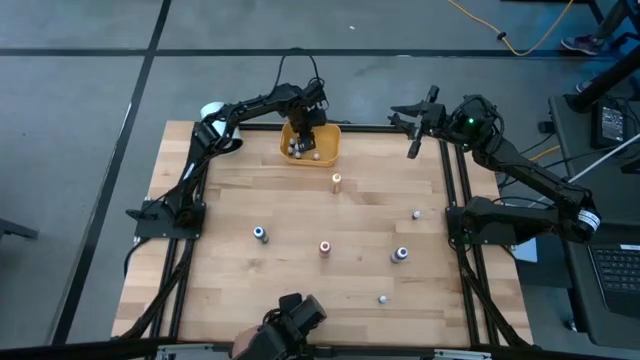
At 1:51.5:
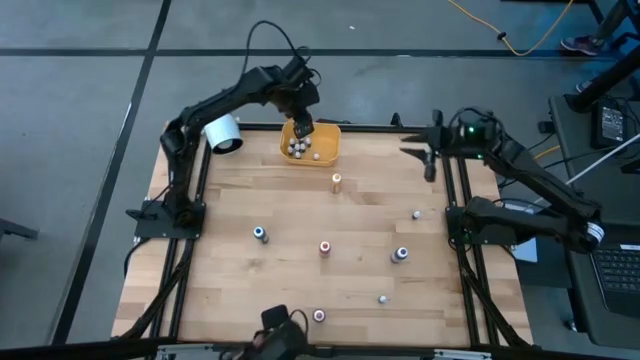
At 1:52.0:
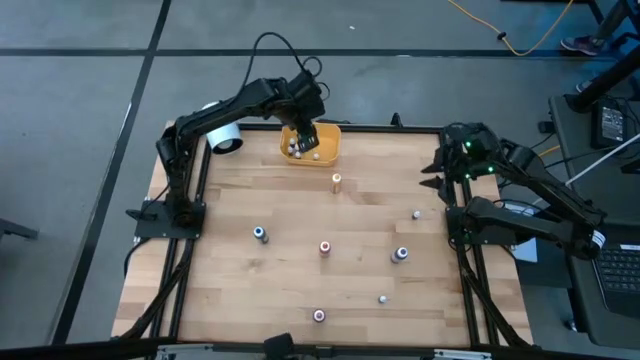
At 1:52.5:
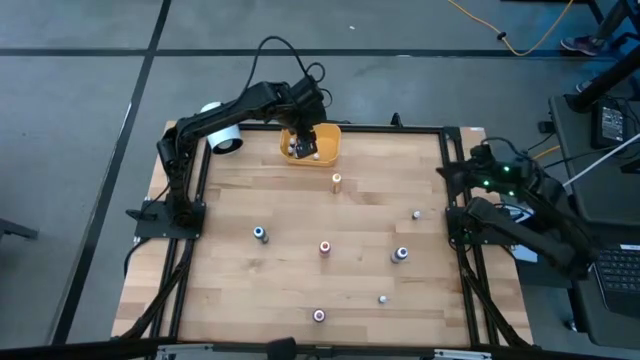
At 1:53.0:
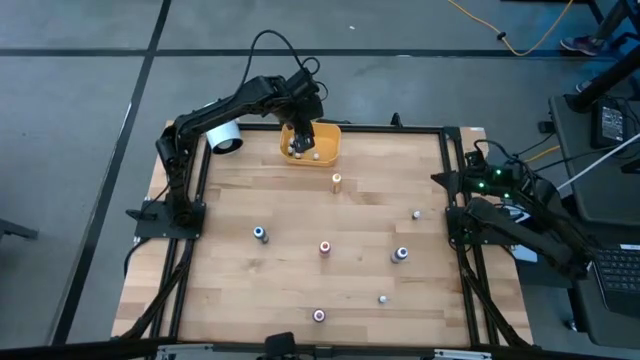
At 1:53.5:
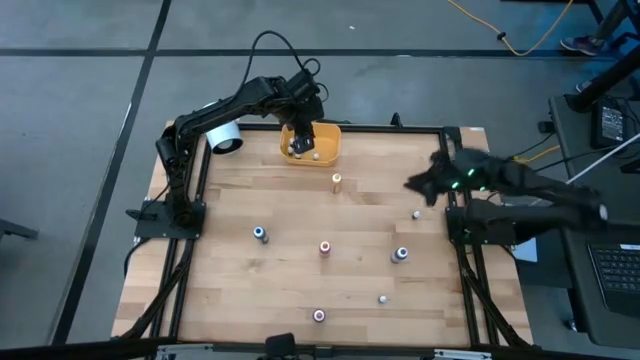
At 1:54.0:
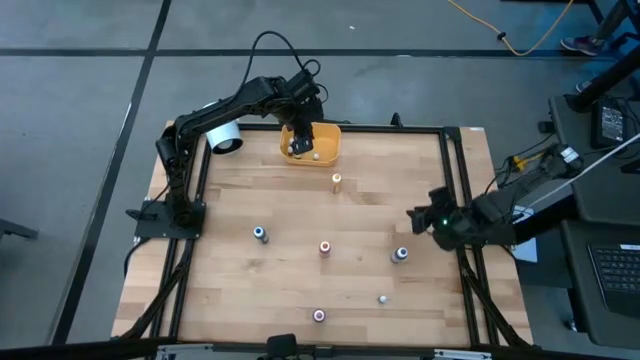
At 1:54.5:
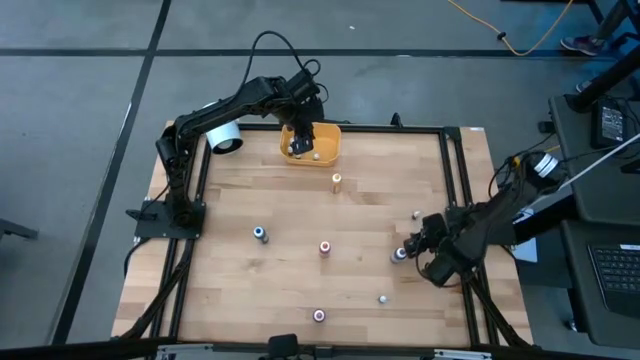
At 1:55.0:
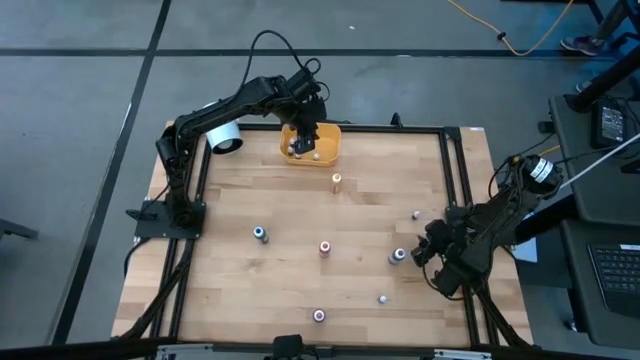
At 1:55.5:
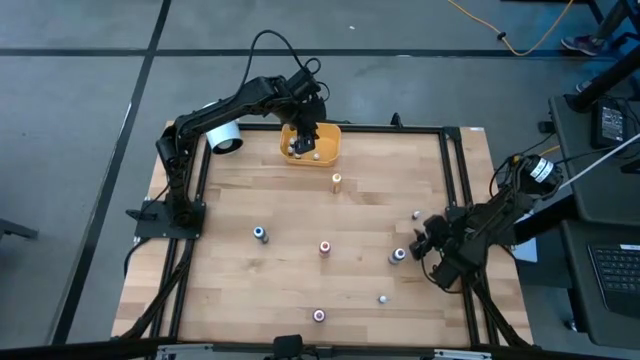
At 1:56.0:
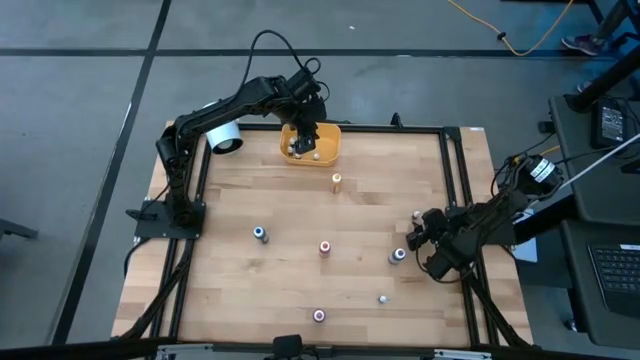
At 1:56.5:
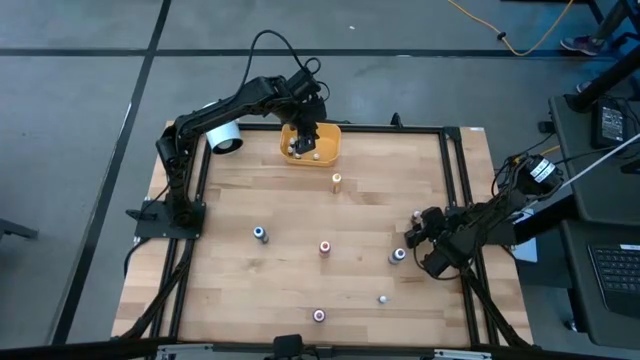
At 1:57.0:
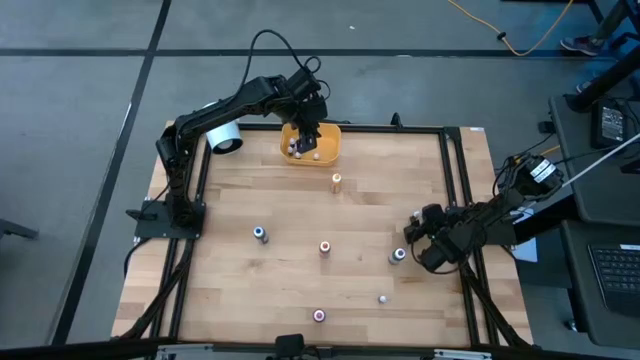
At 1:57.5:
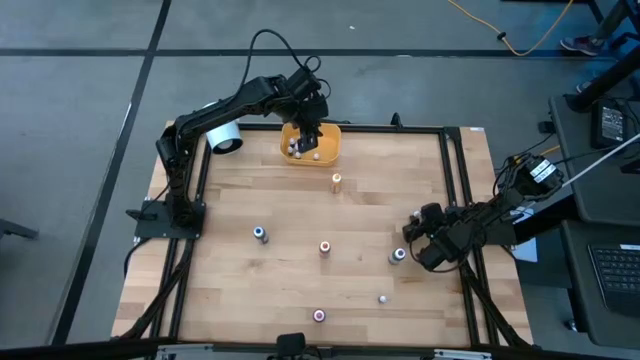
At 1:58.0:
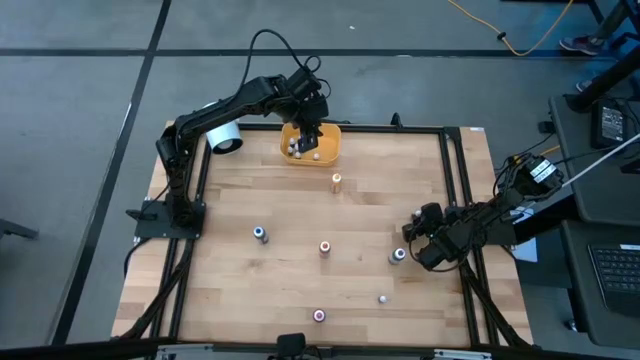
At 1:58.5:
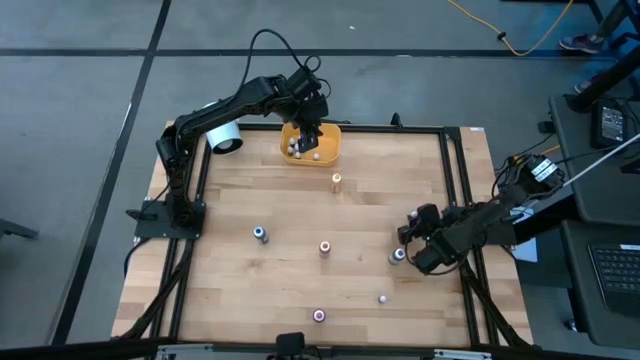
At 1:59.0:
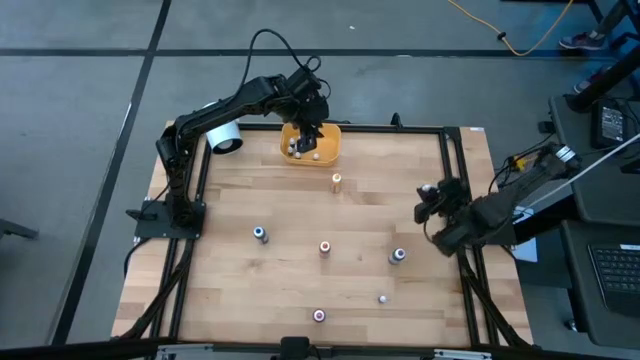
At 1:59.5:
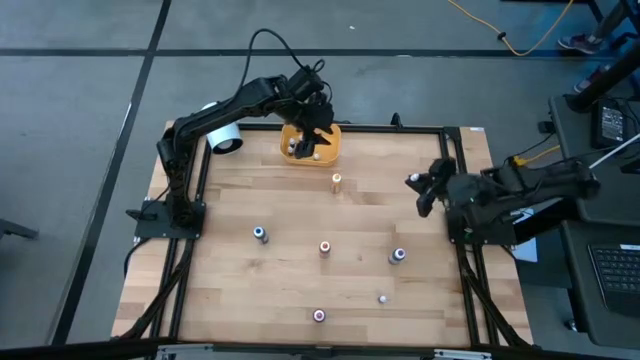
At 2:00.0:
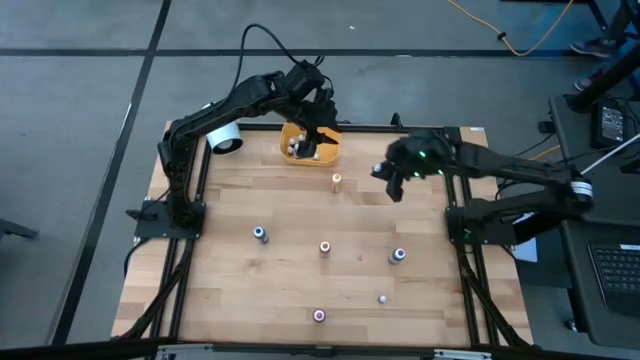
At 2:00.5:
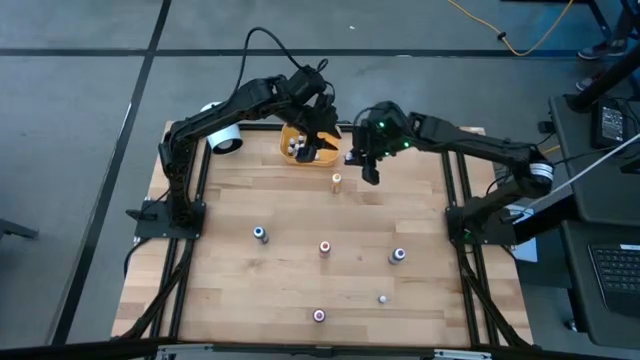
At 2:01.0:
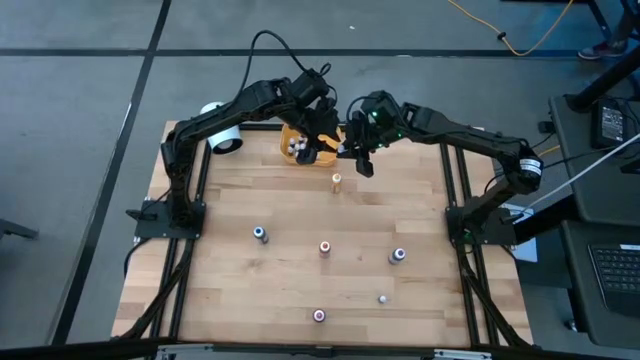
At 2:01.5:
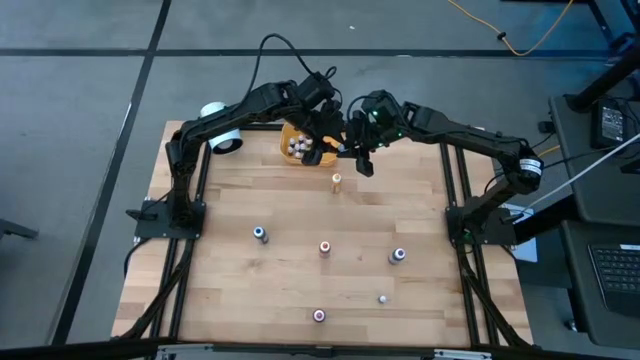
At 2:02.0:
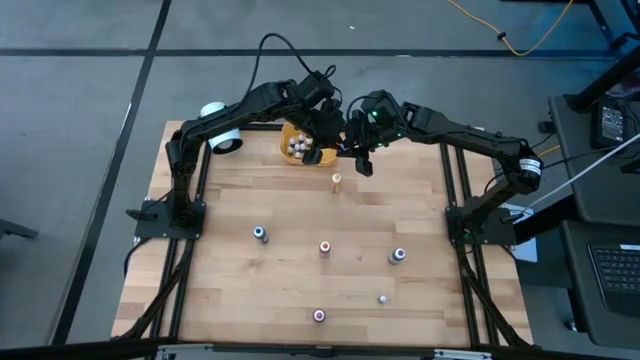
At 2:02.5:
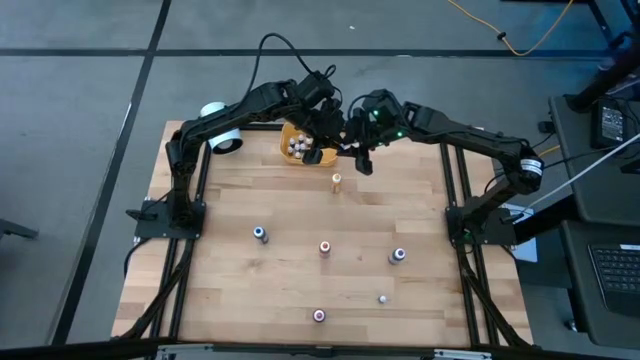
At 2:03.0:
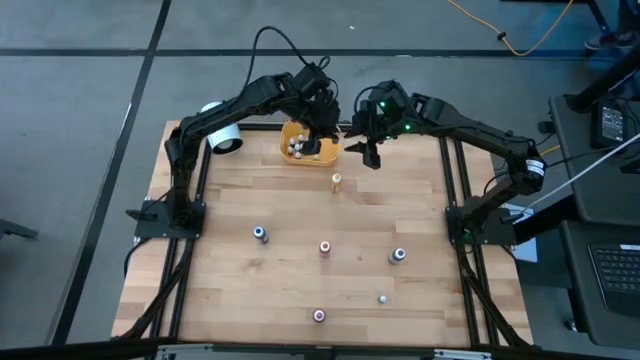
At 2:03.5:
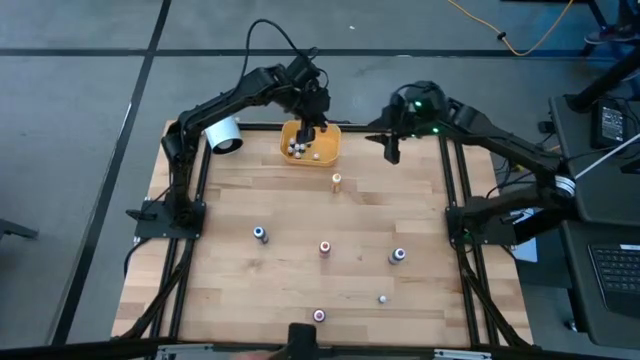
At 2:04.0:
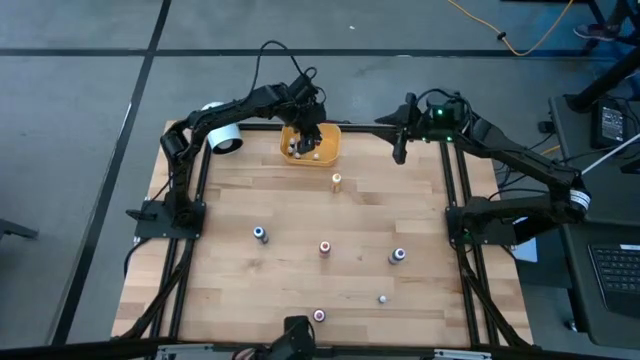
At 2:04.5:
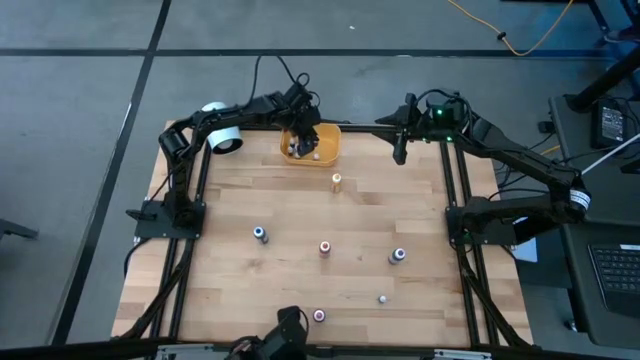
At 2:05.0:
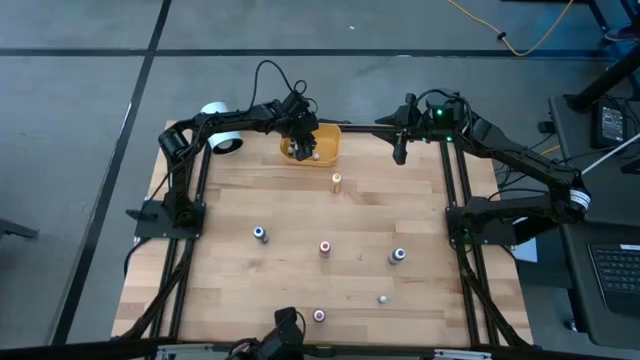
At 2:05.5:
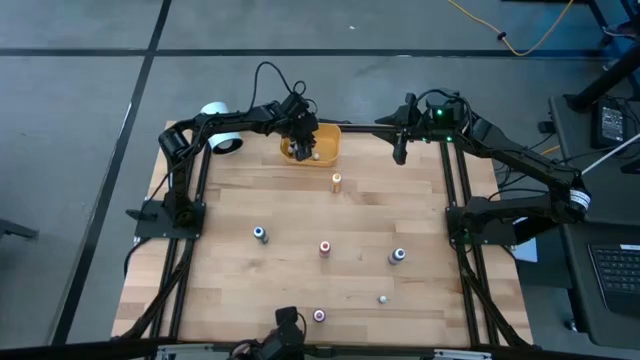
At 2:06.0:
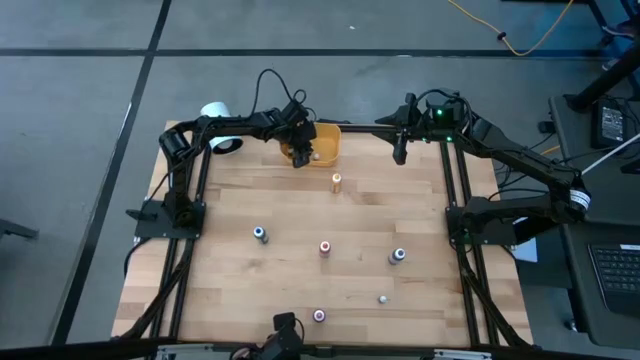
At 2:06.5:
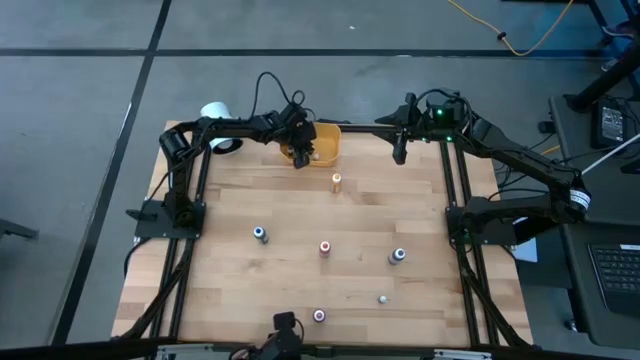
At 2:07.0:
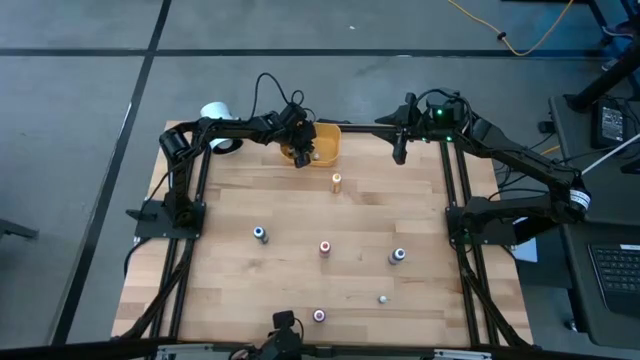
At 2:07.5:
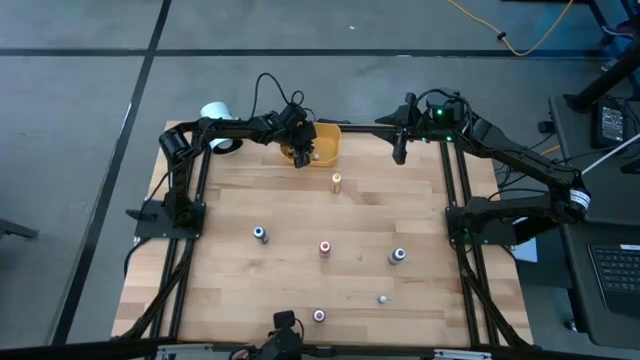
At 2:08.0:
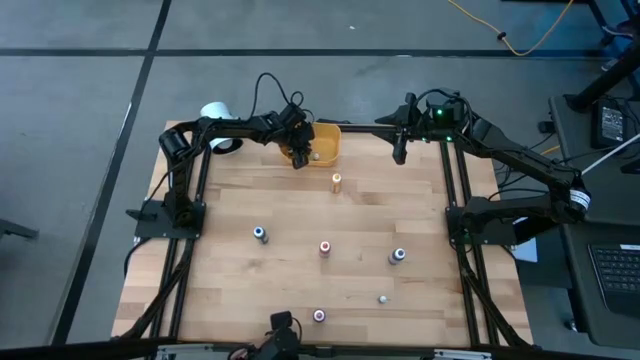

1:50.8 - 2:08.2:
Task: Pick & Place food coloring
Put the red food coloring bottle into the yellow bin

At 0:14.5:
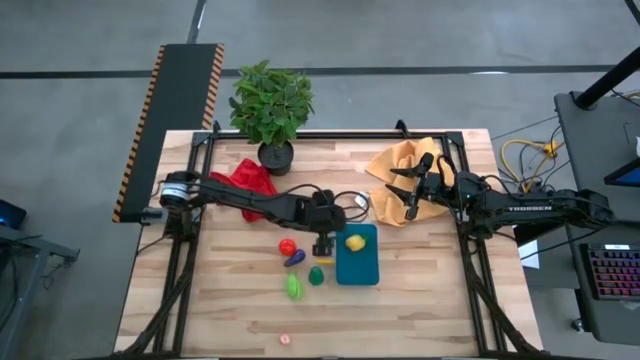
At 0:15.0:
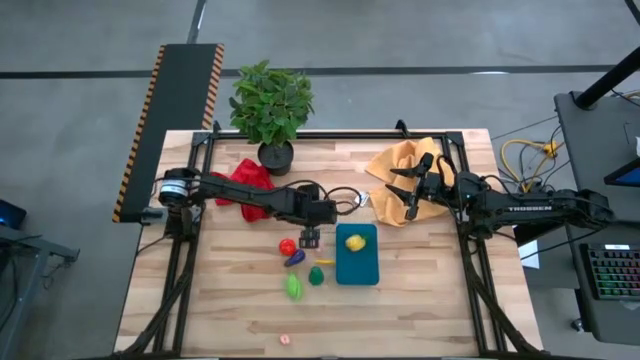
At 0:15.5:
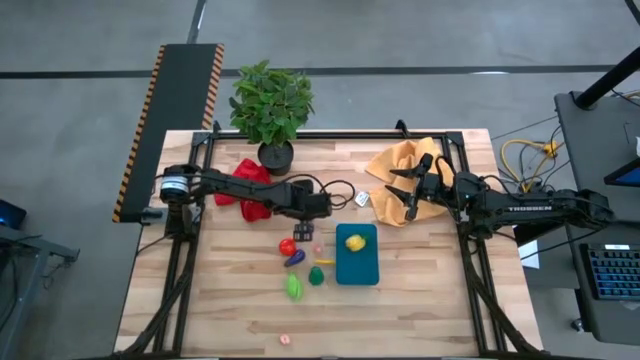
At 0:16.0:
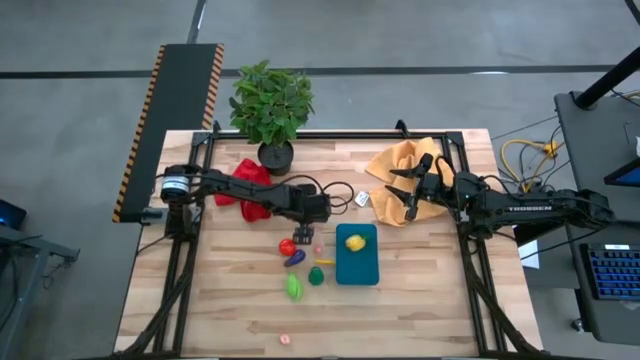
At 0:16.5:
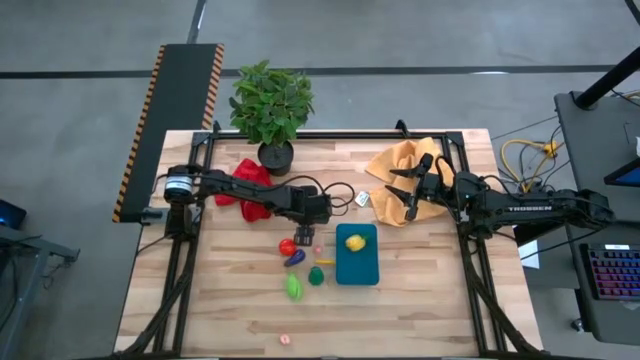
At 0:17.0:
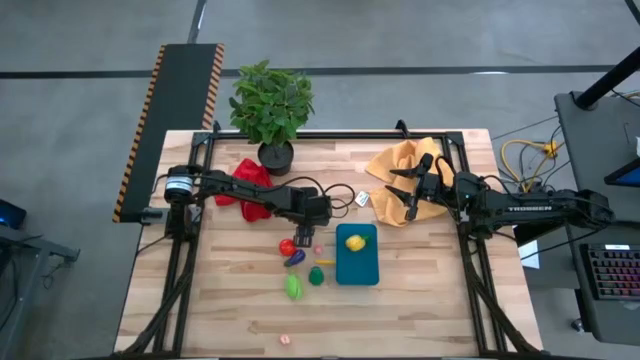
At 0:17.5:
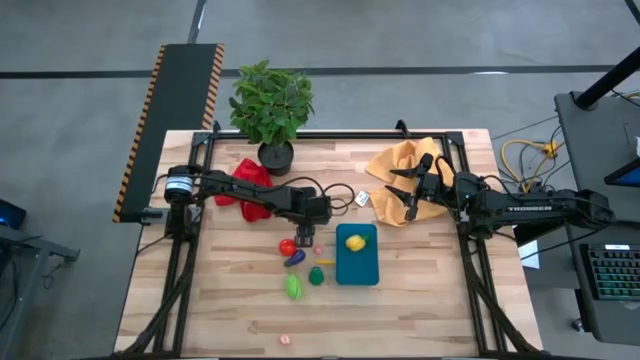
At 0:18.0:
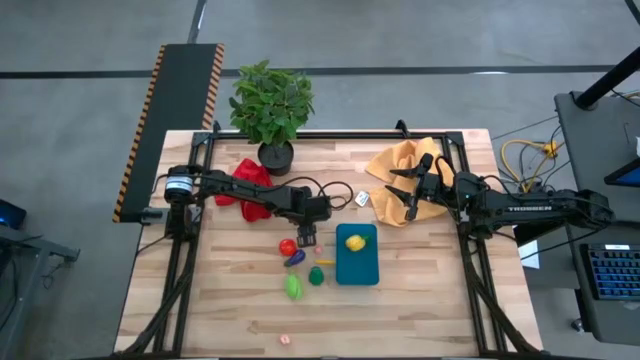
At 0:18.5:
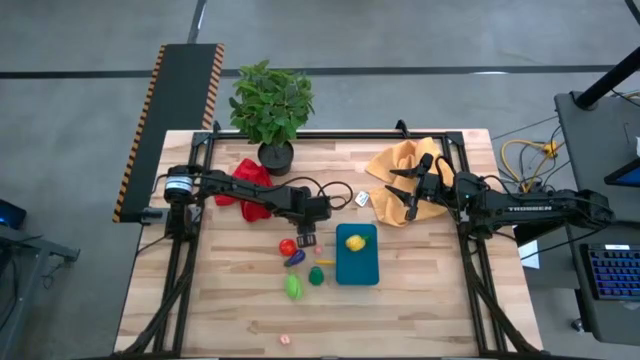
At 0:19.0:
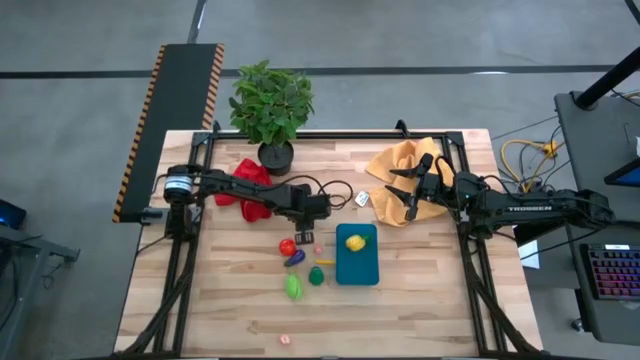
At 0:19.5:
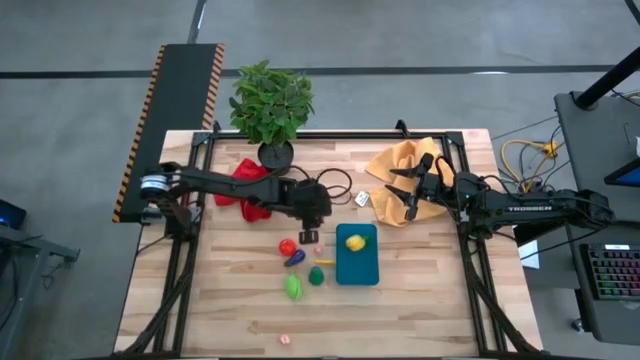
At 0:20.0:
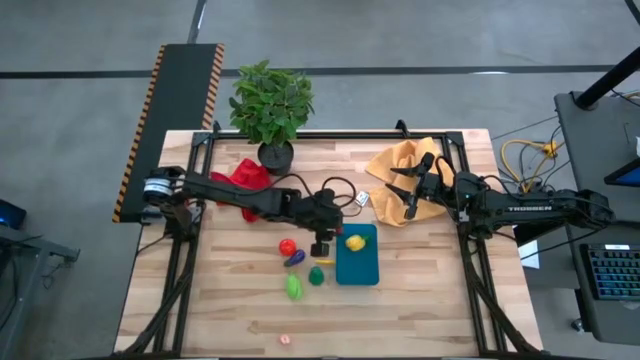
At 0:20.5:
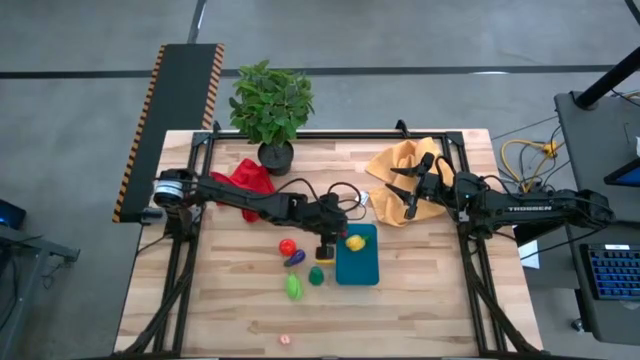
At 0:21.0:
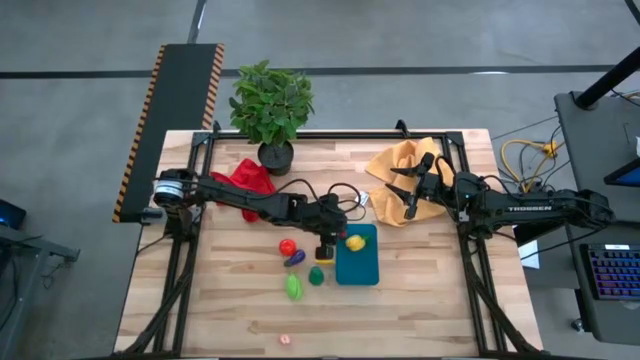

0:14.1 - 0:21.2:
Task: Pick and placing Produce into tupperware
Put the red raspberry into the blue bin
